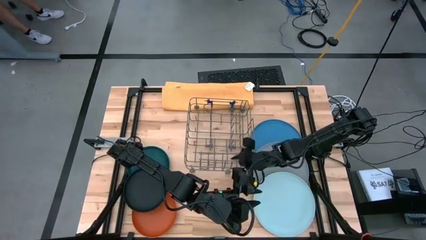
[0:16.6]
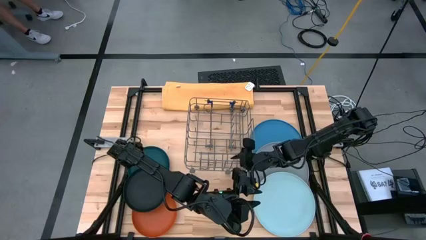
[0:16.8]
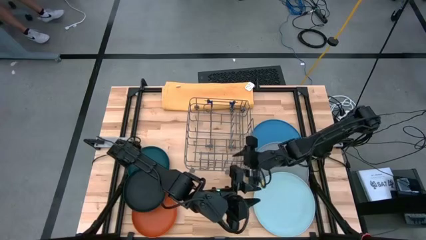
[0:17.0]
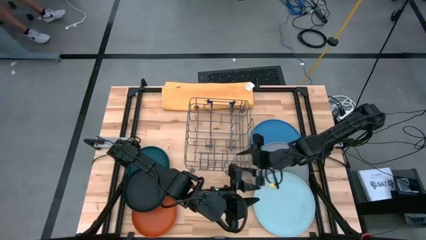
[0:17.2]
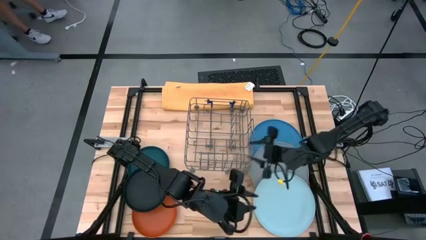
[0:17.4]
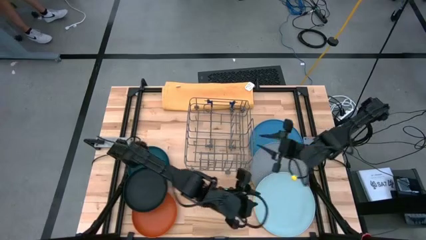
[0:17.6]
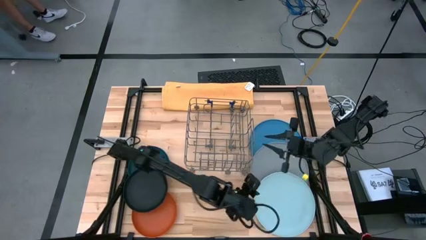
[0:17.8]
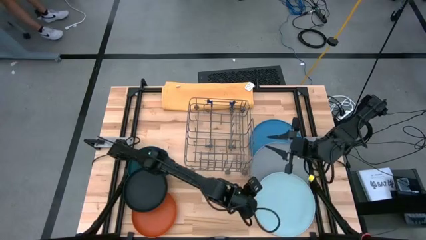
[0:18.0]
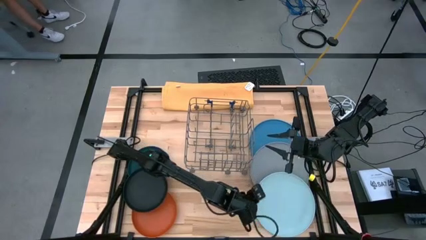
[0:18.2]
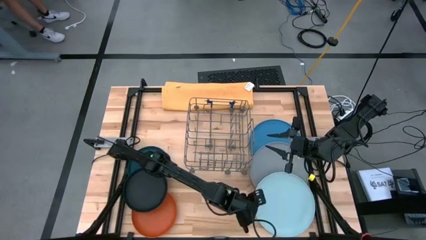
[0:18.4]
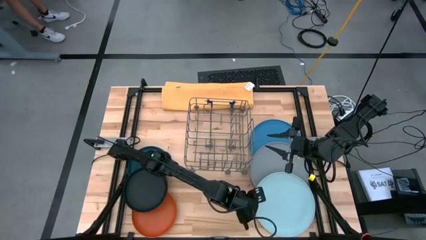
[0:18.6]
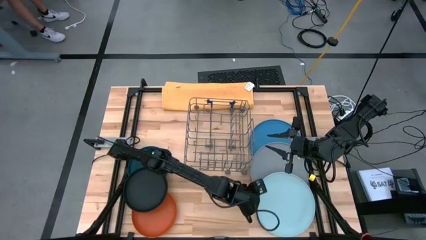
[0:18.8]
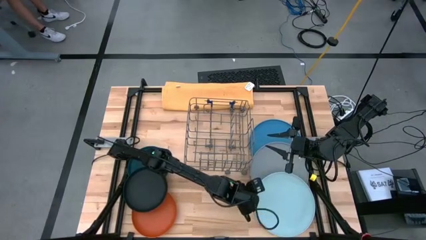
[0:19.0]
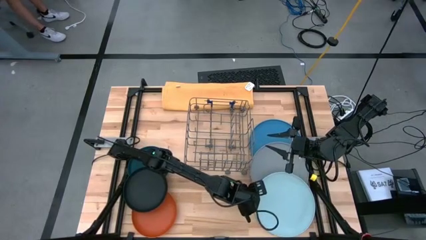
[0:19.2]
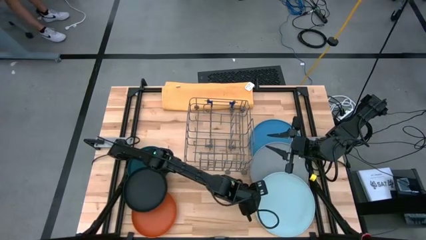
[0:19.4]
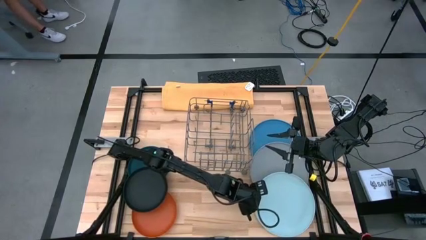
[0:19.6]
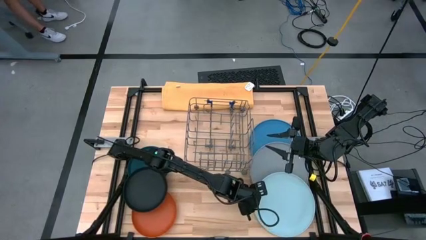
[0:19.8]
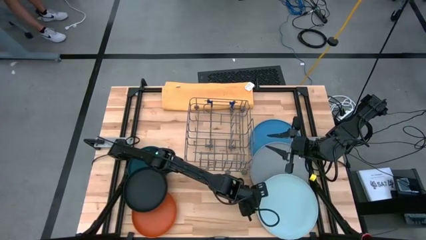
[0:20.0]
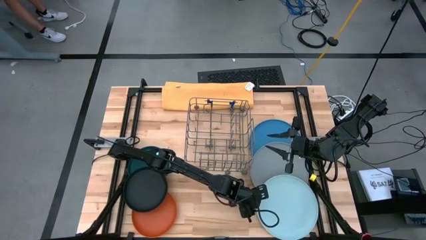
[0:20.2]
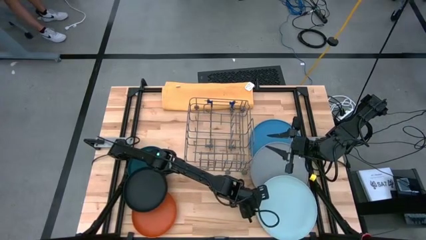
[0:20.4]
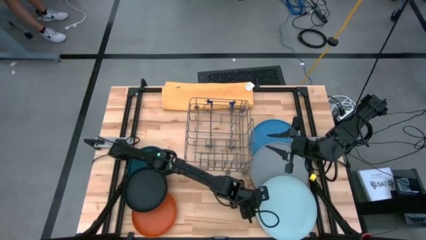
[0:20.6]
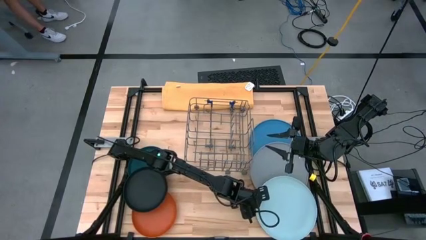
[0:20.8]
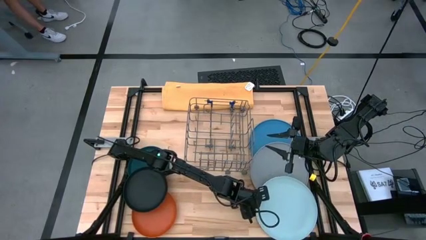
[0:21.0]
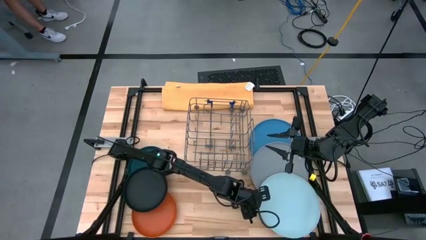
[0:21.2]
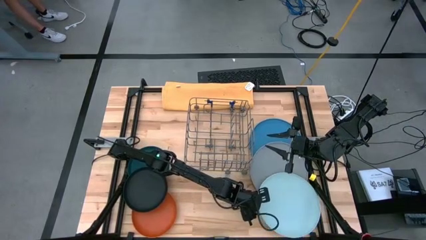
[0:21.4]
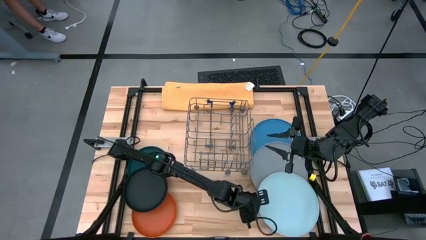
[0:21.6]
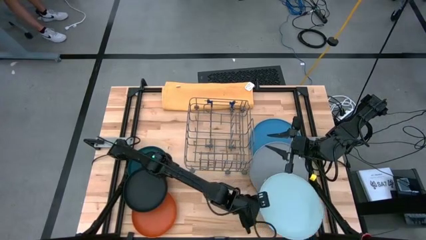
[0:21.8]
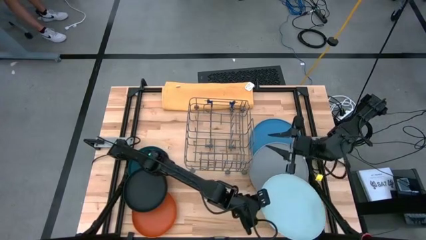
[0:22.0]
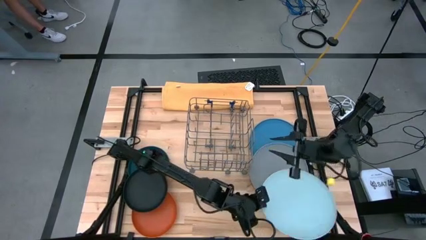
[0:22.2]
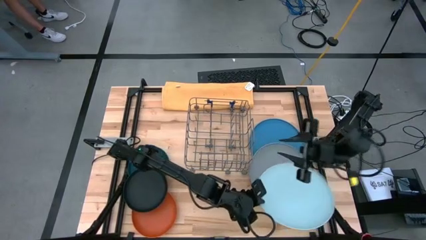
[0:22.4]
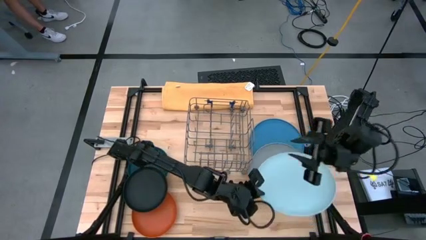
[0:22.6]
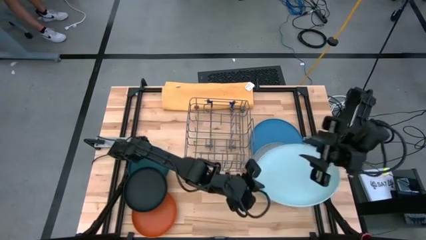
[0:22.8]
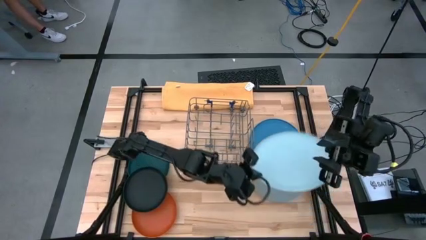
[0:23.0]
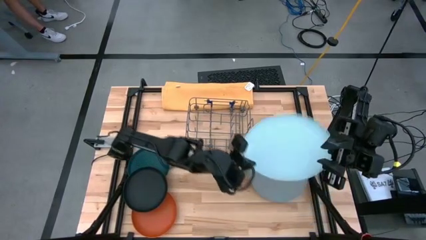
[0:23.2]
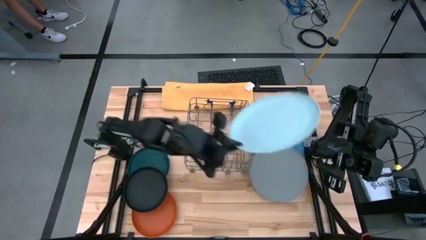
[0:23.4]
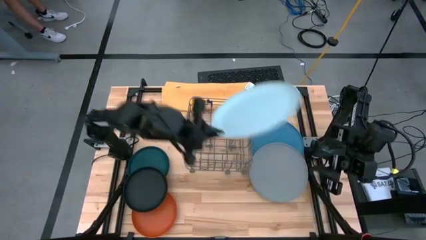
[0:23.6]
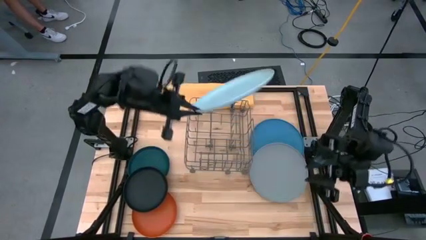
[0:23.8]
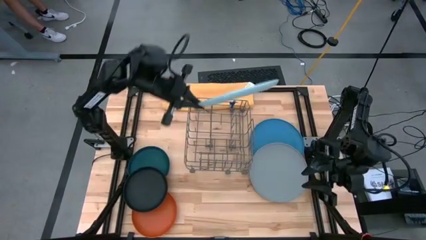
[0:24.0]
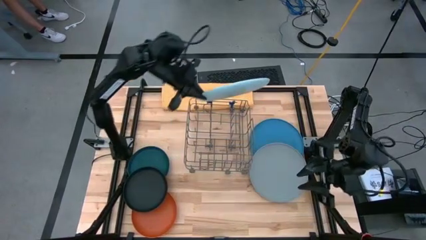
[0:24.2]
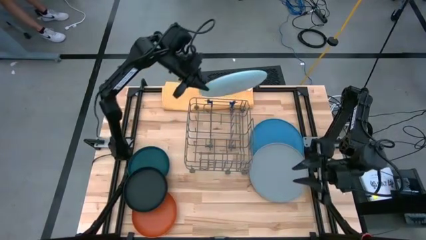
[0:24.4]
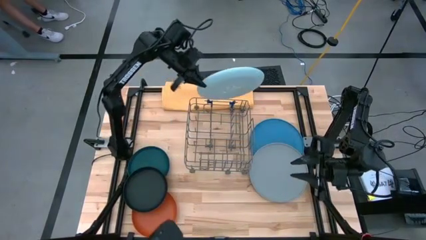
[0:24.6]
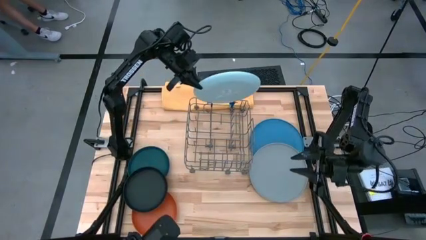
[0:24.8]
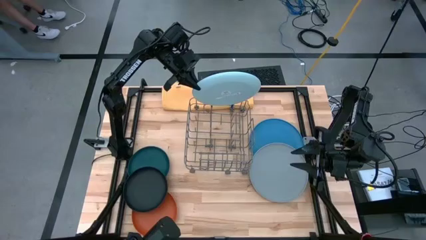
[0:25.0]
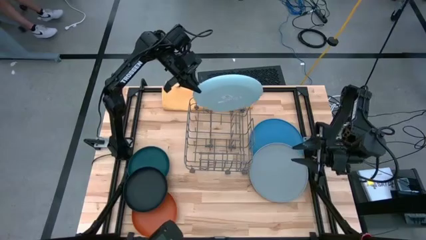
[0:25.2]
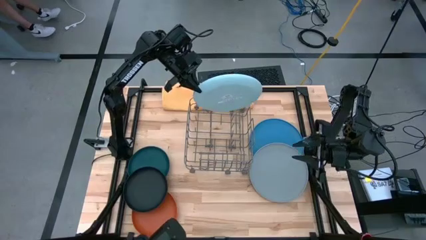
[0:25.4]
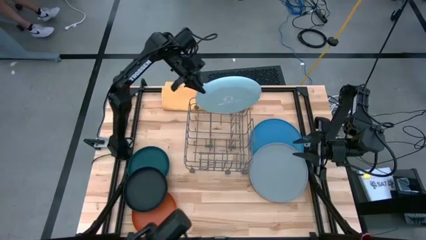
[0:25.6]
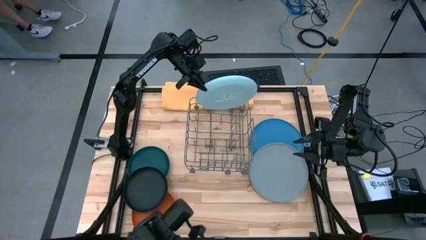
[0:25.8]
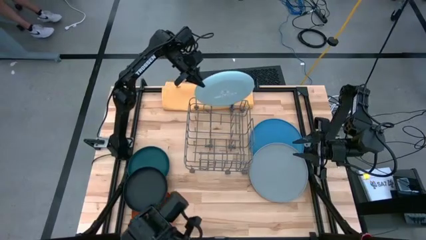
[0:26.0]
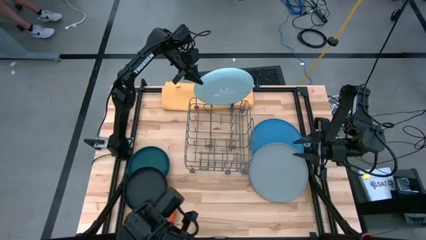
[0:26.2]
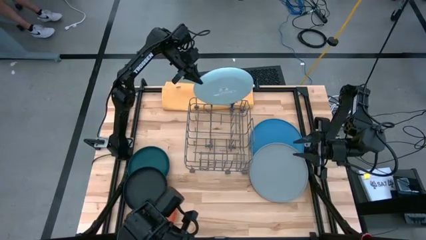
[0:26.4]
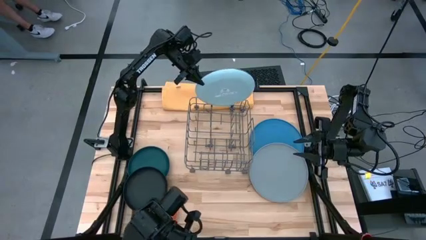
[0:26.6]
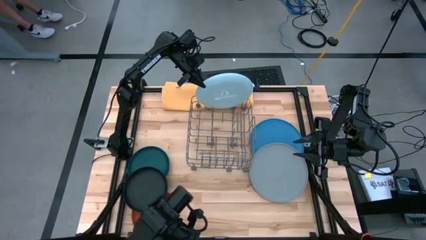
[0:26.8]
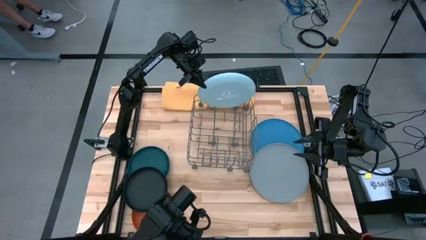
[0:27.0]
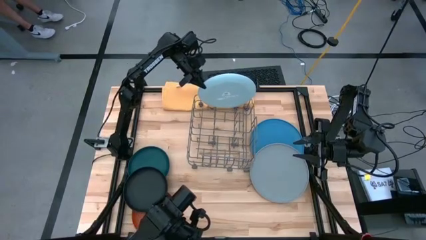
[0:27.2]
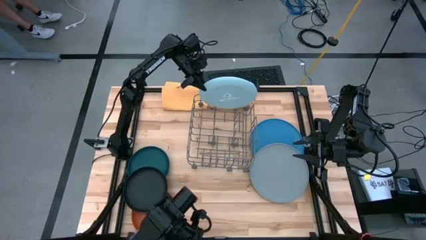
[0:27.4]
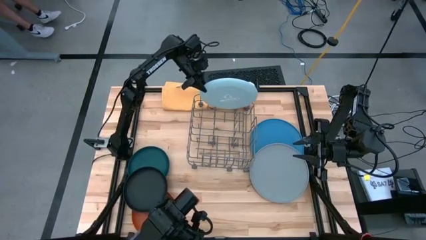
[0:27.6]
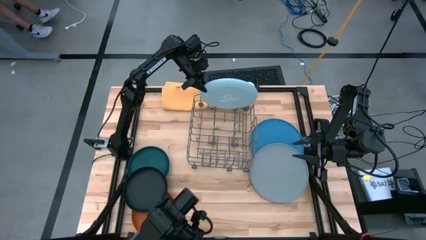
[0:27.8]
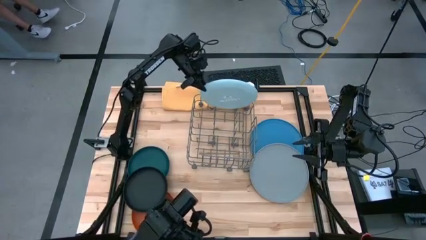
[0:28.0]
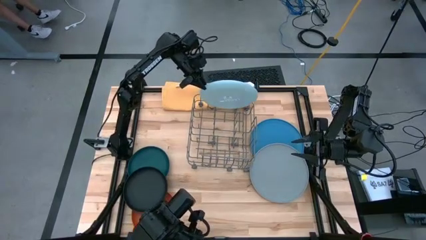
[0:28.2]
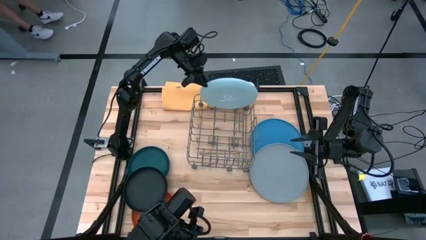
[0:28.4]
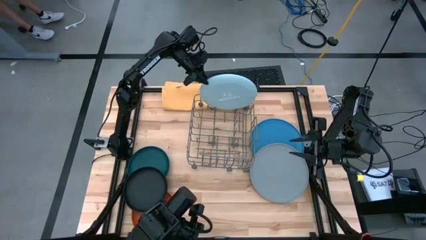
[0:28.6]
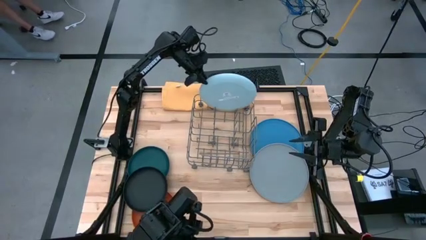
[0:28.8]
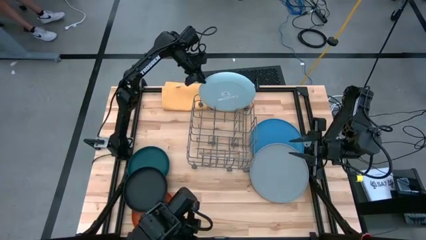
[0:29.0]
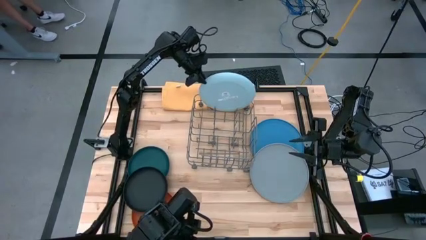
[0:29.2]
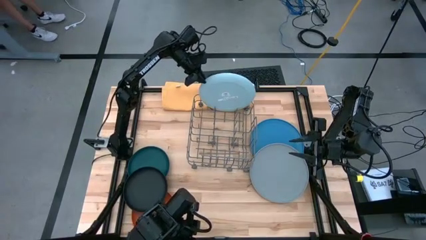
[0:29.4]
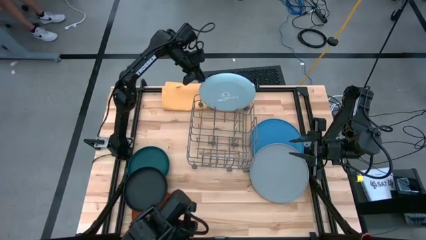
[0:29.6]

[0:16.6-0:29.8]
Task: Sort dishes
Put the light blue plate into the dish rack

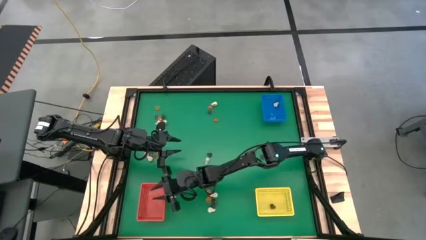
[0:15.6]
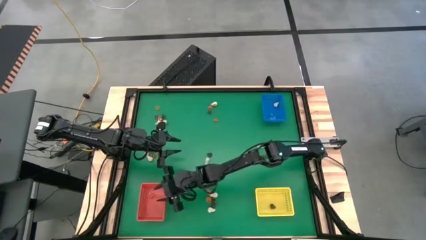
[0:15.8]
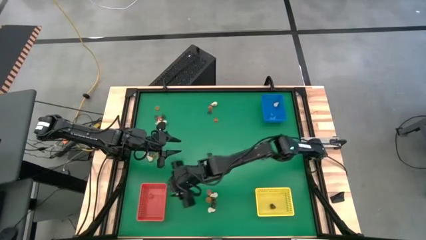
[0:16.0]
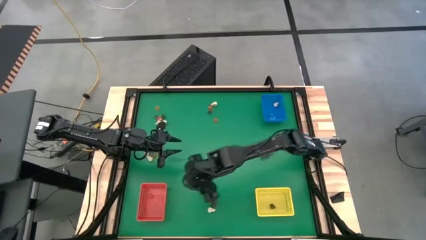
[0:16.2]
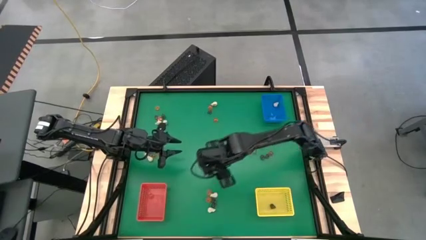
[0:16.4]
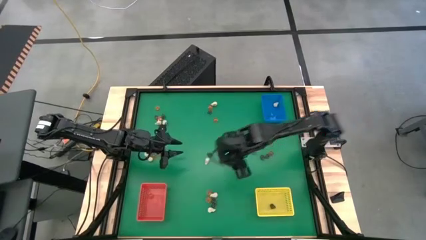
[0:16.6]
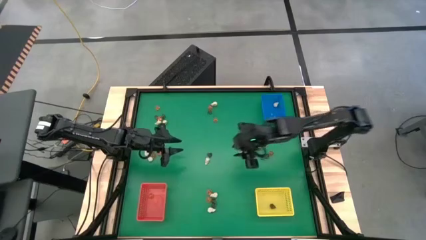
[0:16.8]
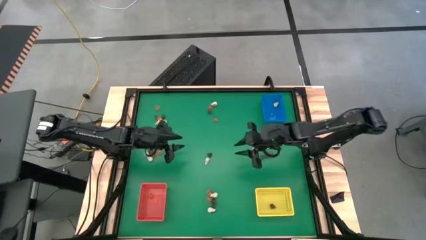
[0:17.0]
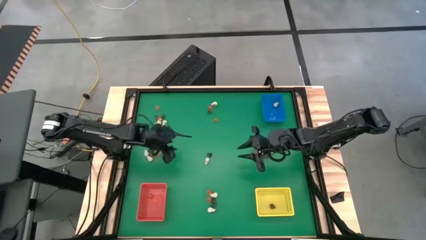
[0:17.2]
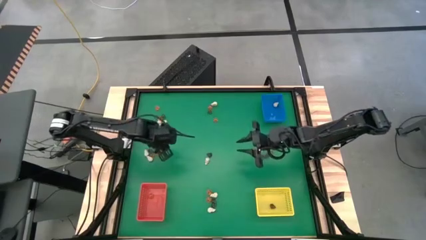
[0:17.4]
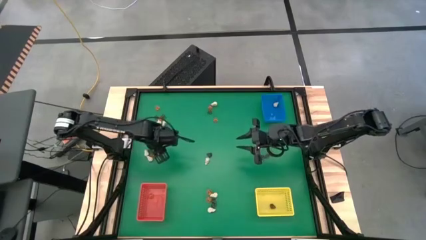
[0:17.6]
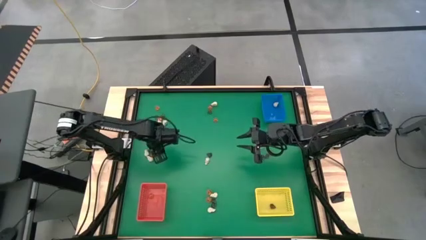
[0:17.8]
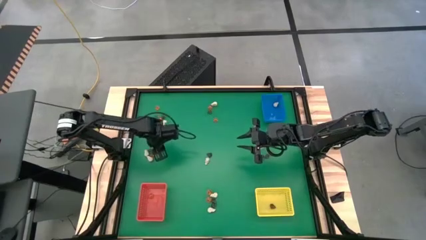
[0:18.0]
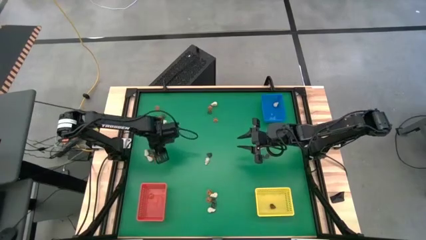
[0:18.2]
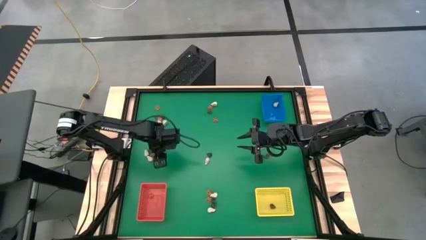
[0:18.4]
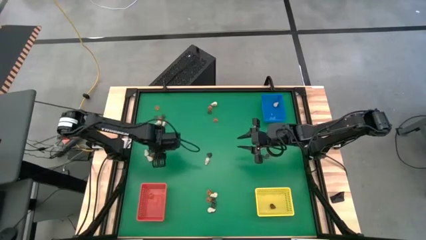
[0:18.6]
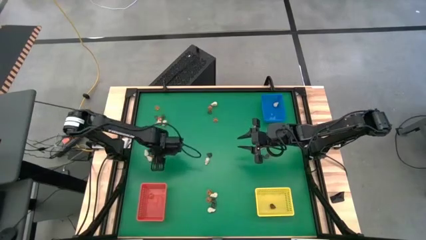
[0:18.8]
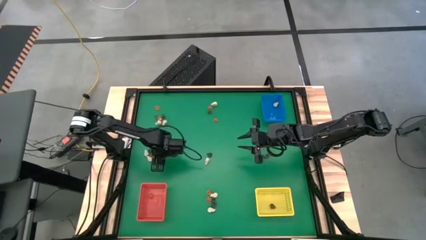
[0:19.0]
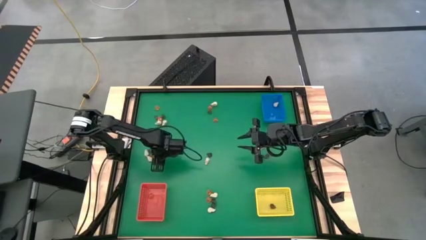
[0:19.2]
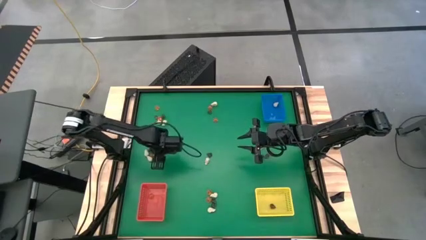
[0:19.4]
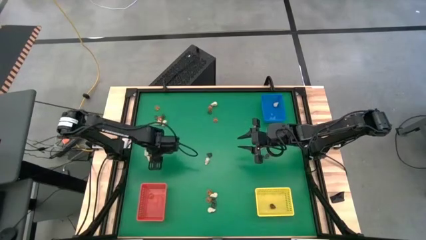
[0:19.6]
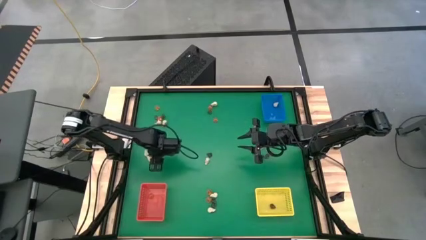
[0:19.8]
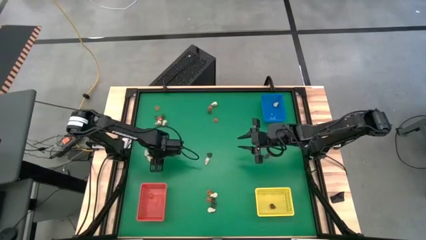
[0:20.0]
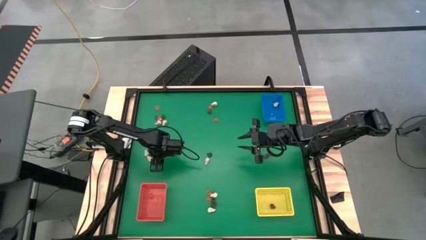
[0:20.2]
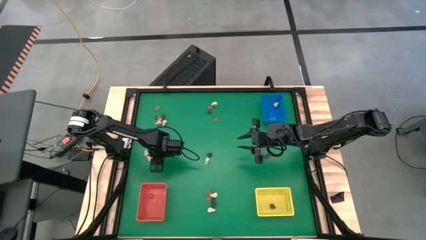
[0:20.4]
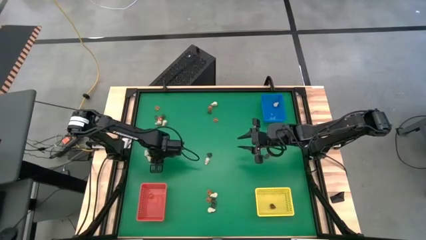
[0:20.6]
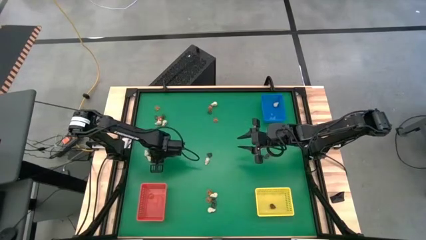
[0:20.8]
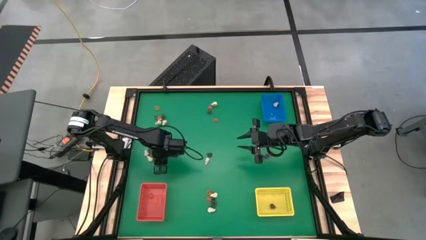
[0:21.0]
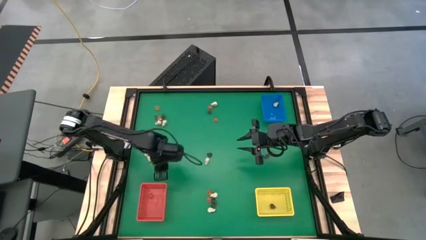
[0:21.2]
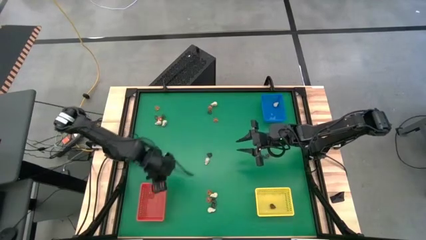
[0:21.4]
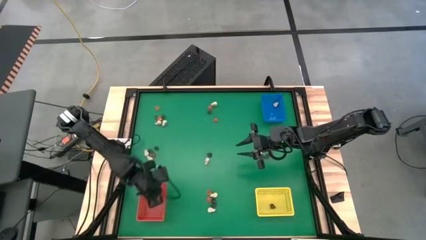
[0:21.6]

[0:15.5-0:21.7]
Task: Sort Halloween decoration
Put the orange pumpkin toy into the red bin
